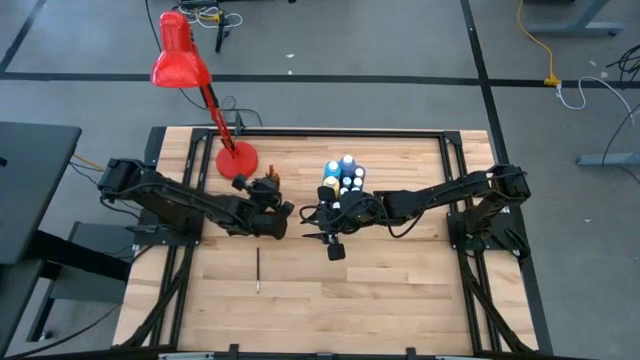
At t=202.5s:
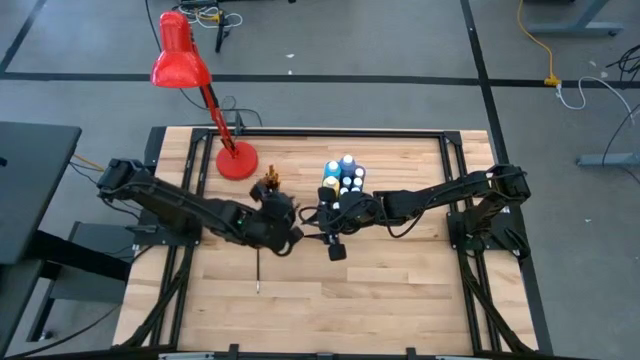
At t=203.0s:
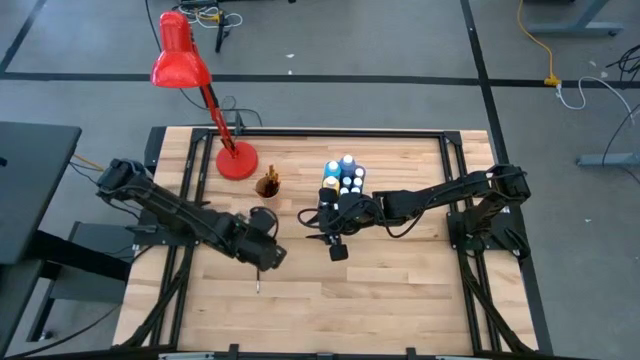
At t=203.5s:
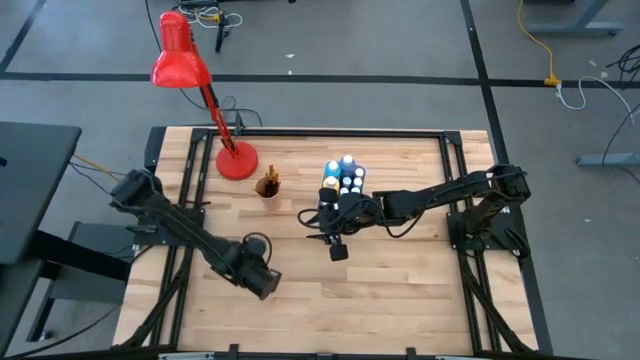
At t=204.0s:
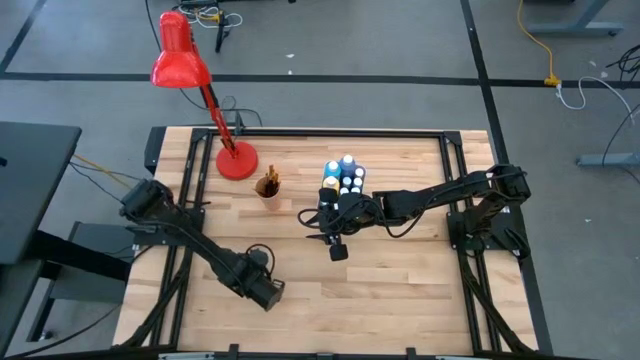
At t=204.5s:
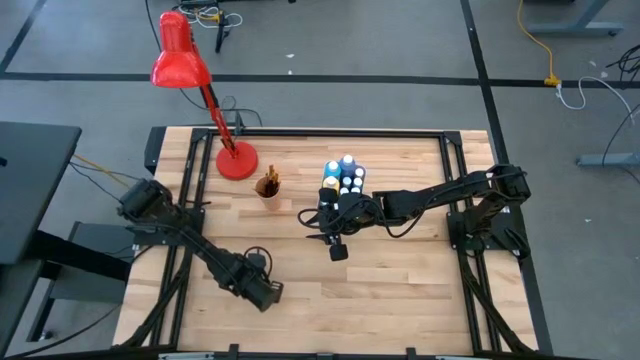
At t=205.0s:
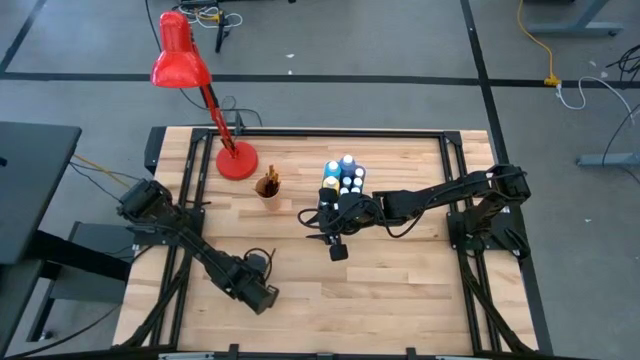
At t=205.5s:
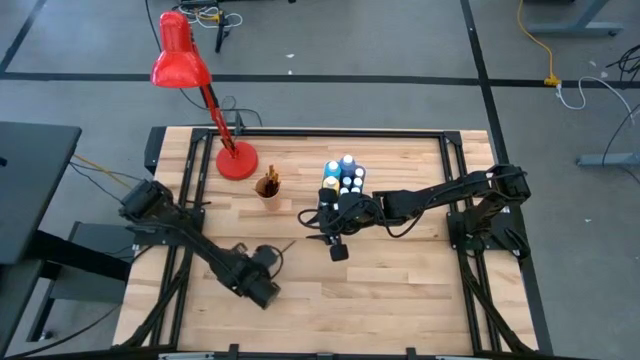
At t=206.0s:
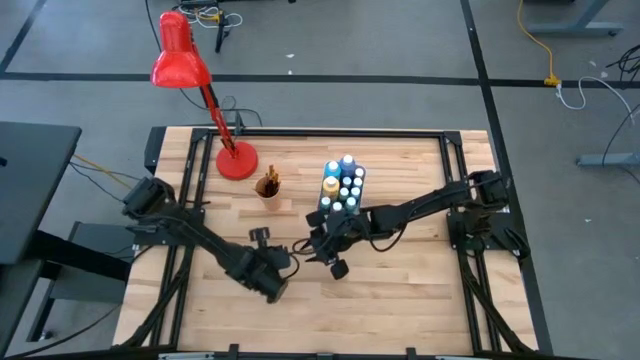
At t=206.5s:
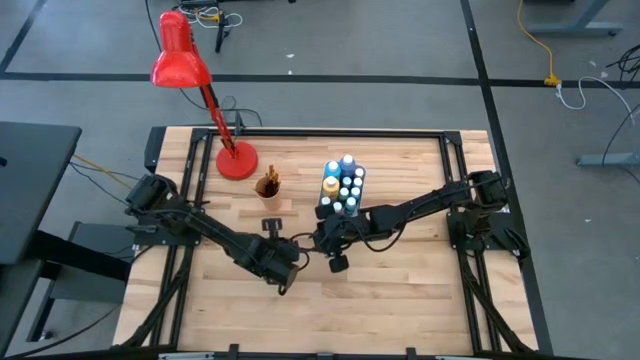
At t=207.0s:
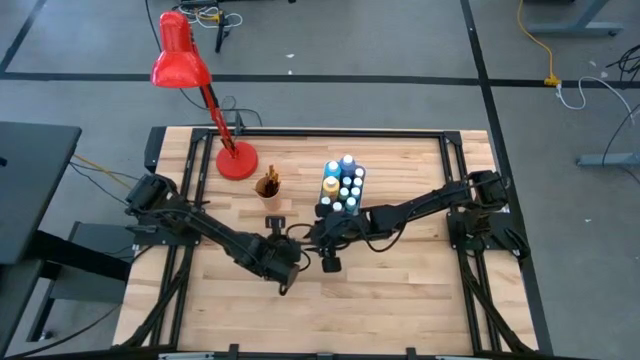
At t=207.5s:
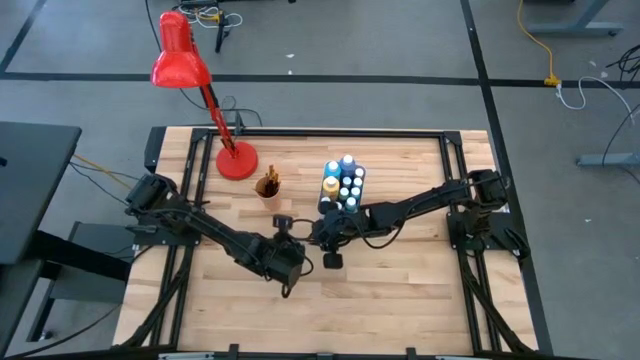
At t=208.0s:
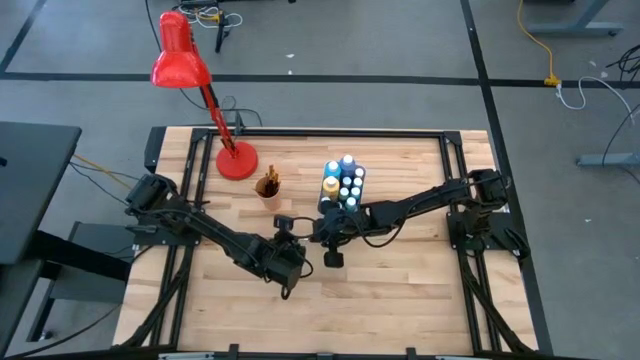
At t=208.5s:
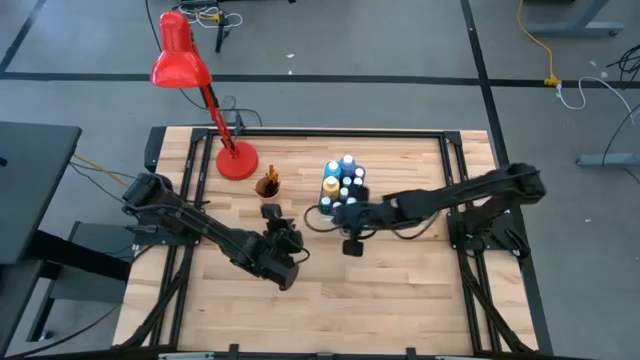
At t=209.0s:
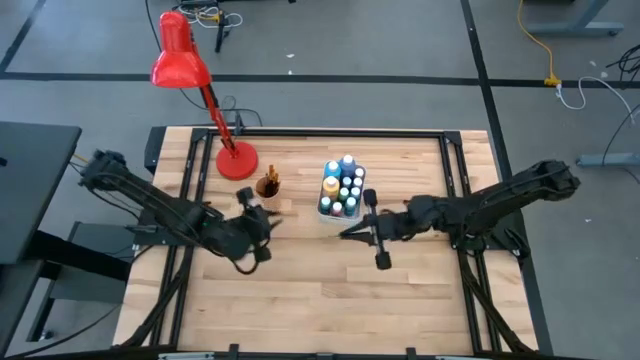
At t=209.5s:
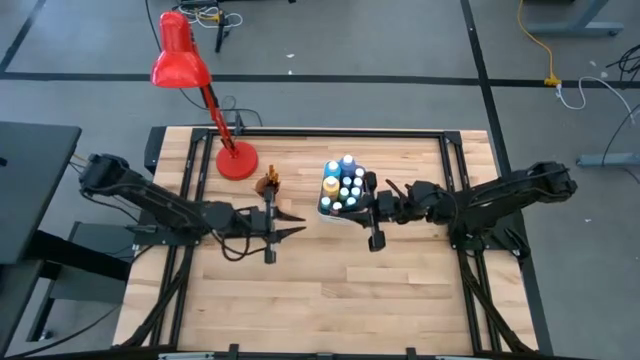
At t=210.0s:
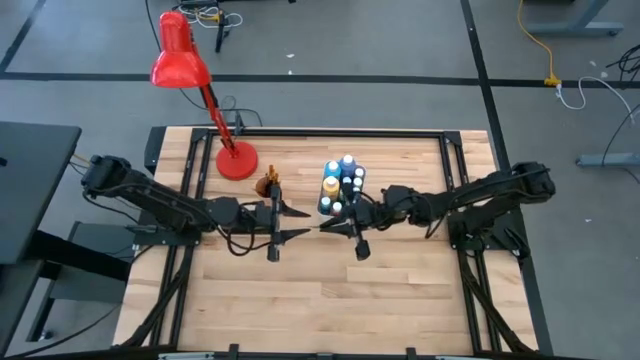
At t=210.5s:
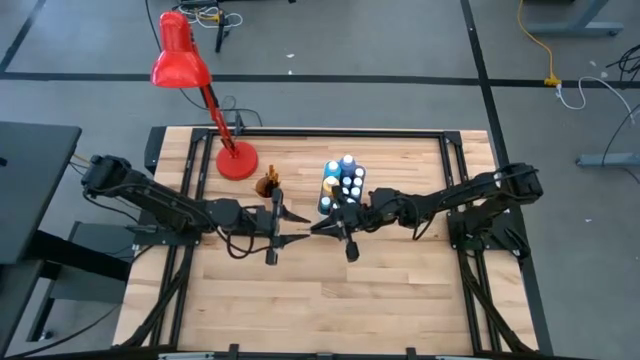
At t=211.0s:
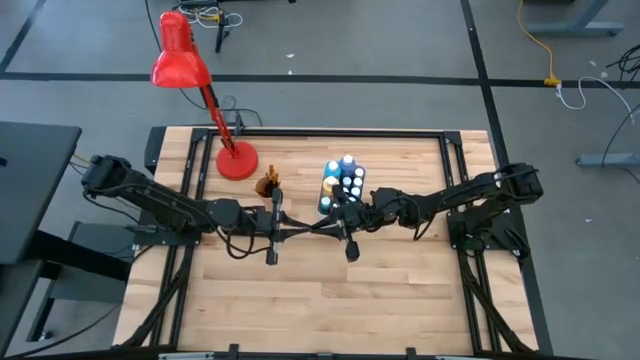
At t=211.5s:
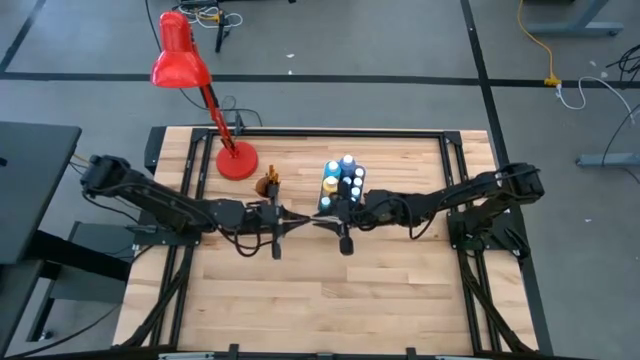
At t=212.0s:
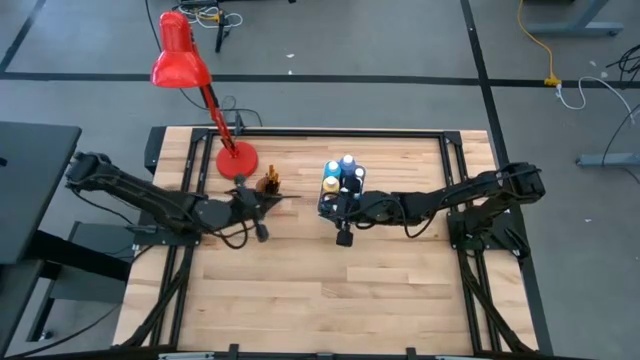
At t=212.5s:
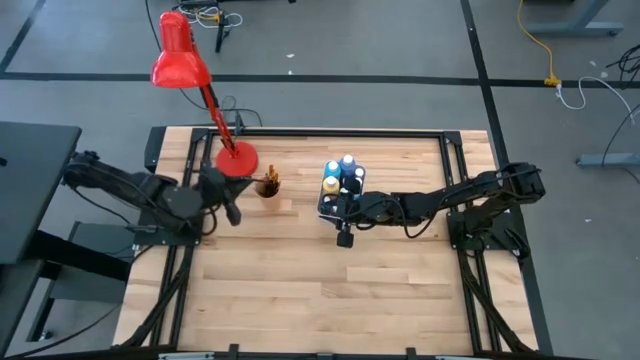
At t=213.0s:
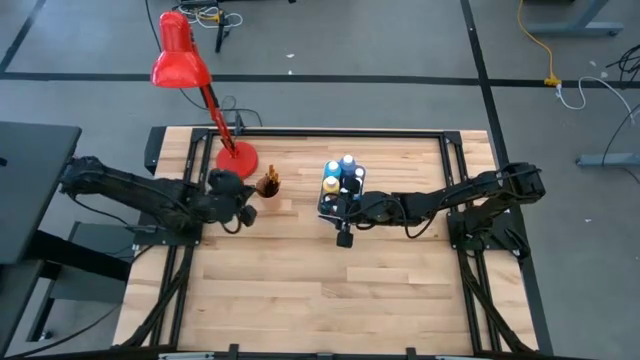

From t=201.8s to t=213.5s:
Task: Pick & Place Paint Supplies
Put the white paint brush into the orange cup

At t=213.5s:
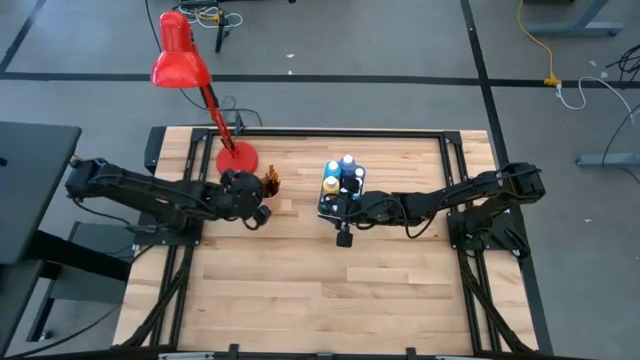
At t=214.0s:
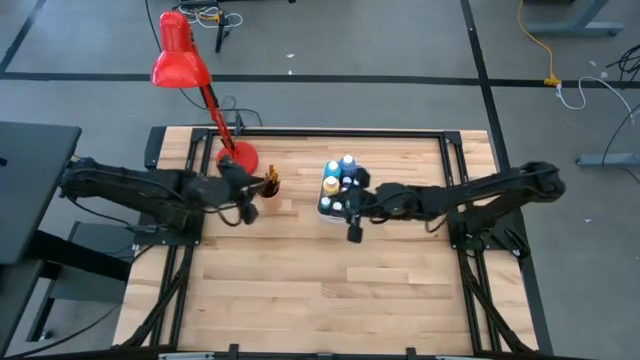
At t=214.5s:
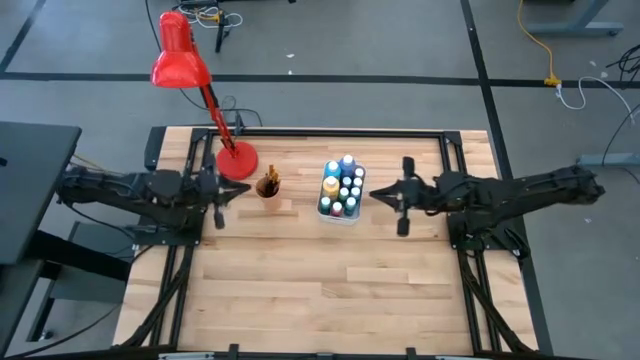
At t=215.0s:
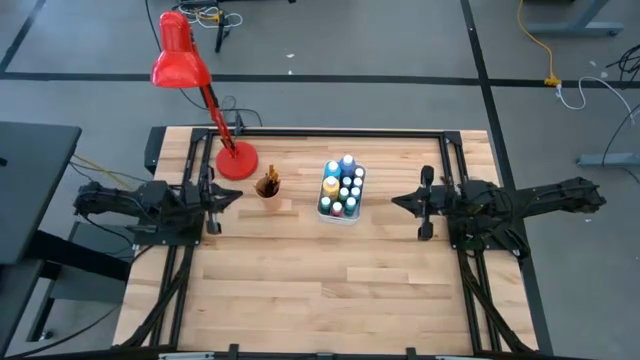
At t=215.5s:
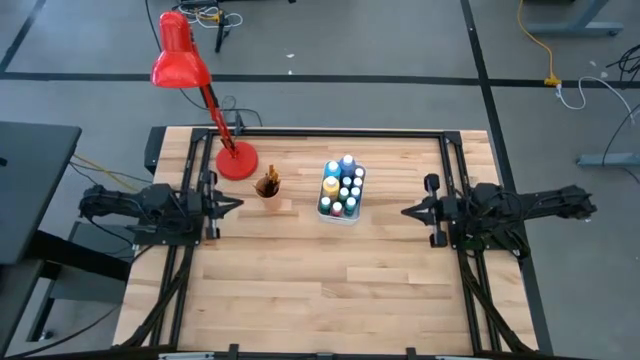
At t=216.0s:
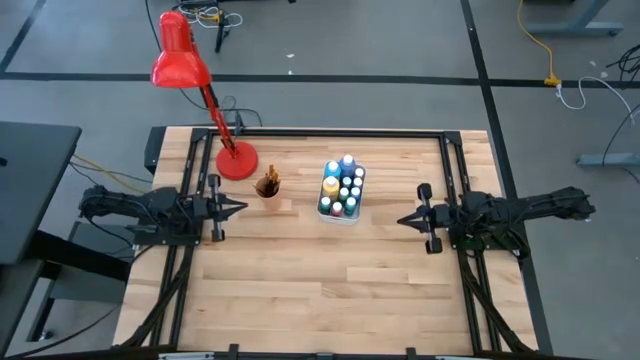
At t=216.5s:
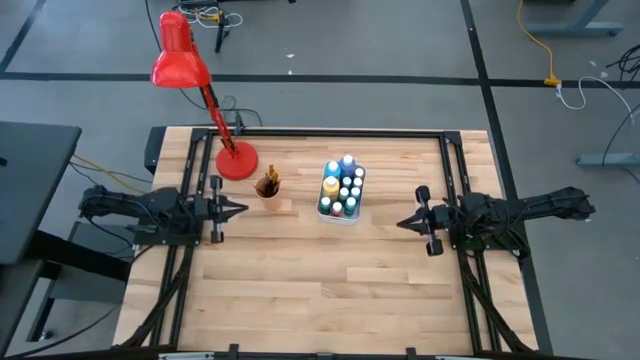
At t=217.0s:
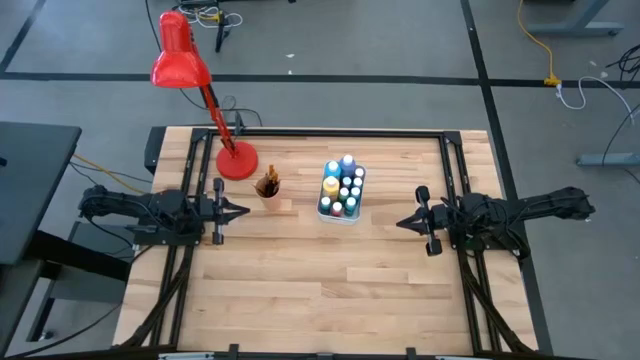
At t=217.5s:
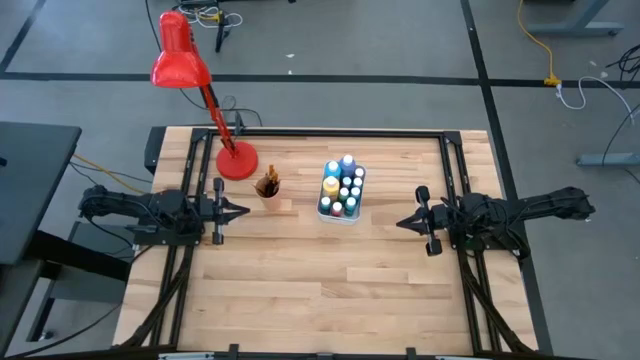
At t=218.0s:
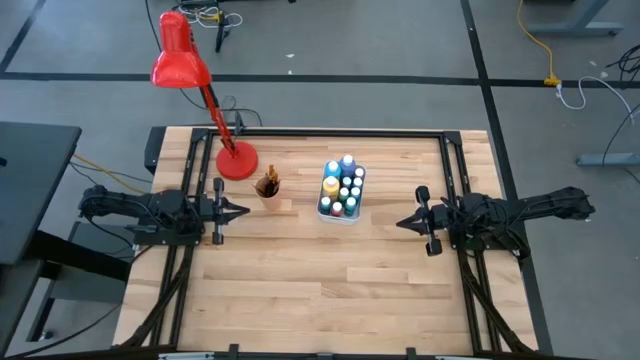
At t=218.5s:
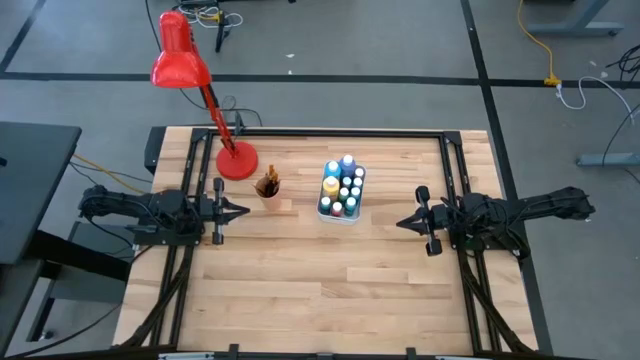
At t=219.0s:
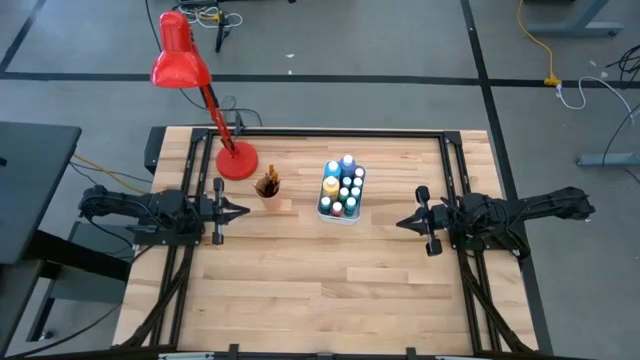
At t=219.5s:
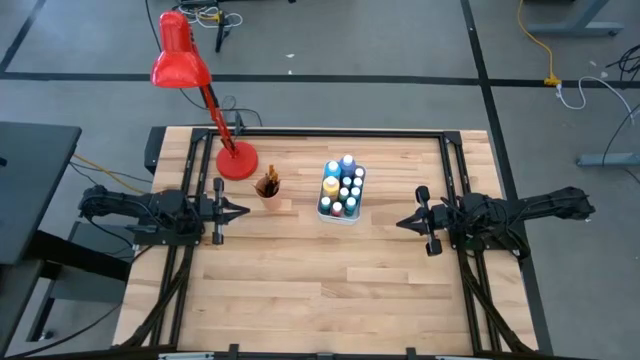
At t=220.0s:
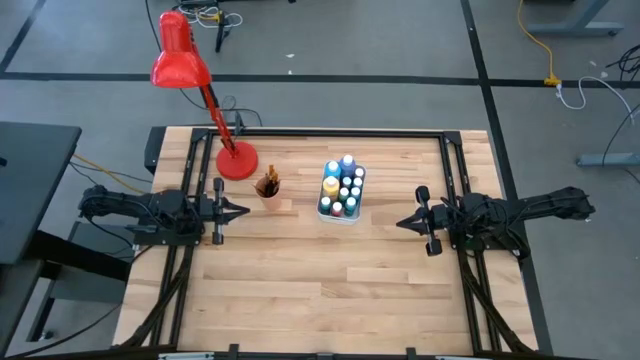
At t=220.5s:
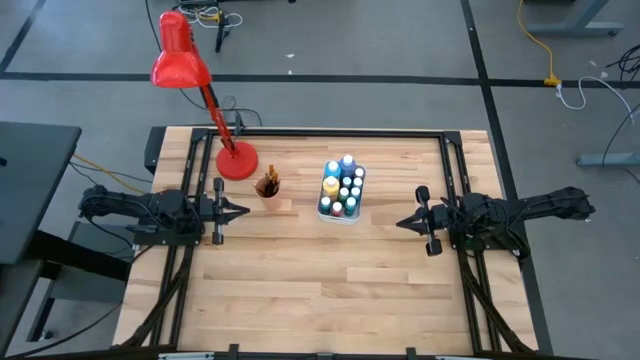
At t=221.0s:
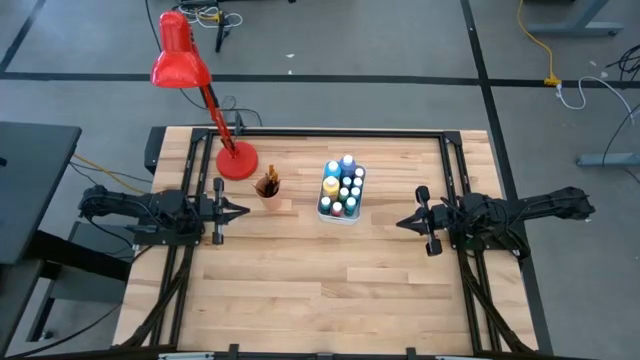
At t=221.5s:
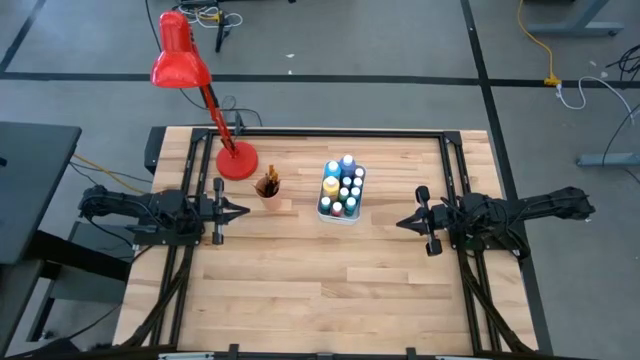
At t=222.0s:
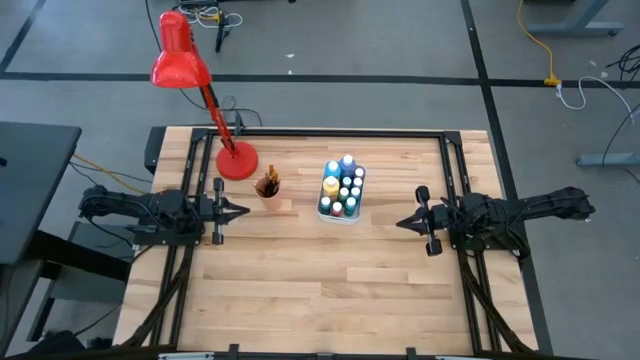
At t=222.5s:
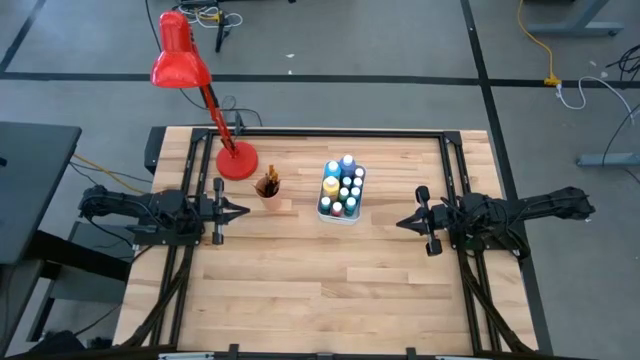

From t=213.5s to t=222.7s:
Return to Home Position

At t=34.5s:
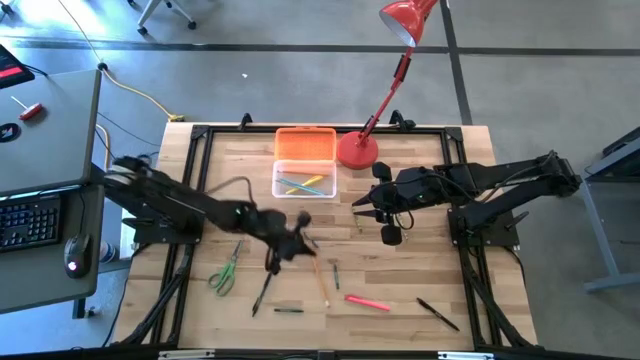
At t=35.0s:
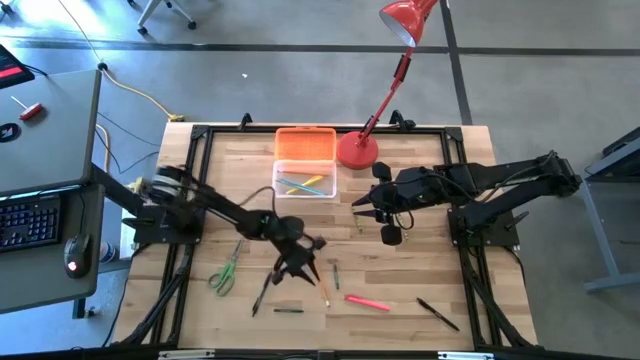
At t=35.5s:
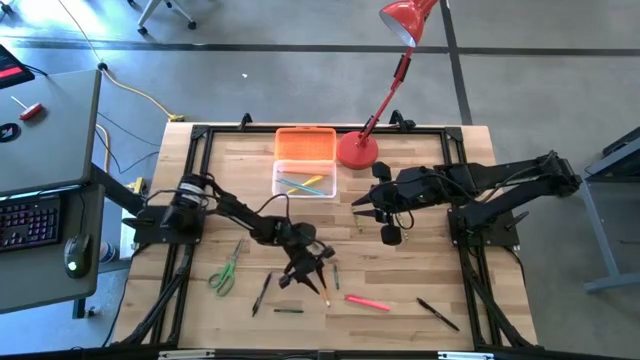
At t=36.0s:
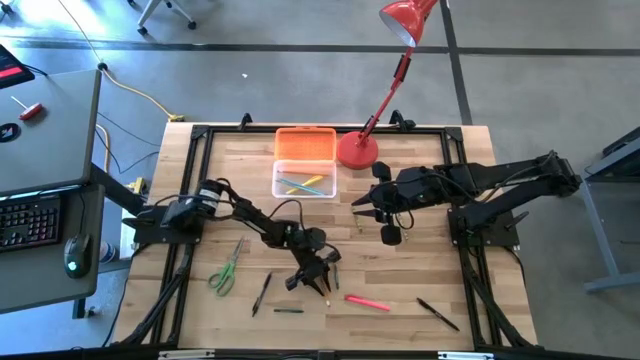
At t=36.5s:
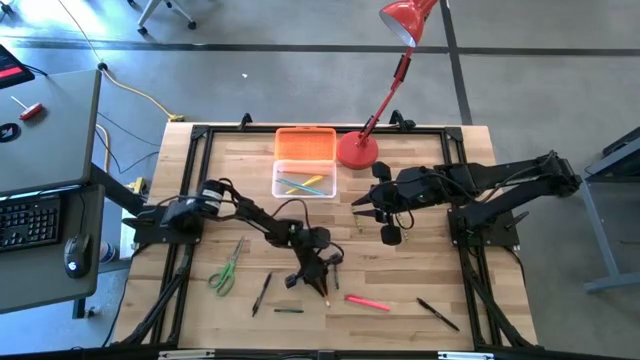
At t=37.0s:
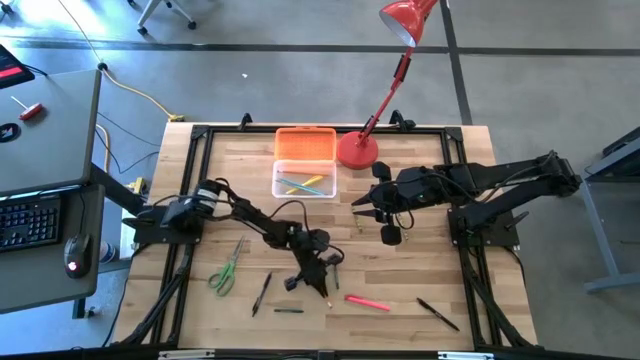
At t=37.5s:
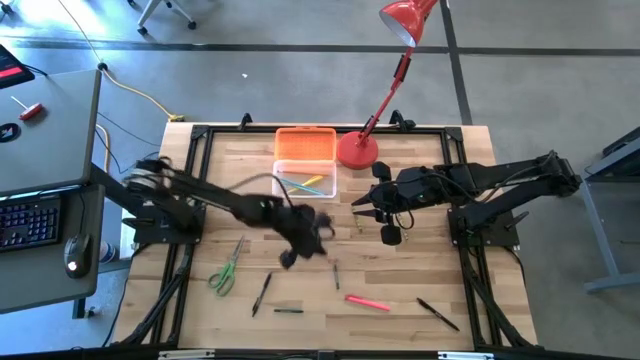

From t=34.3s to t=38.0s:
Task: Pick & place school supplies into a supply box
Put the orange pencil into the orange supply box
